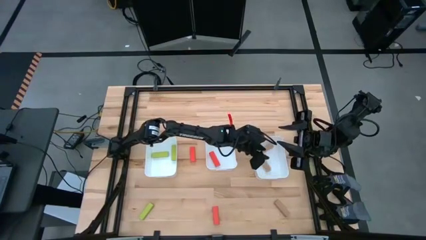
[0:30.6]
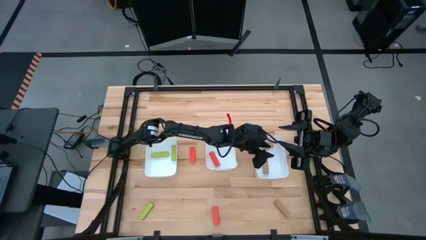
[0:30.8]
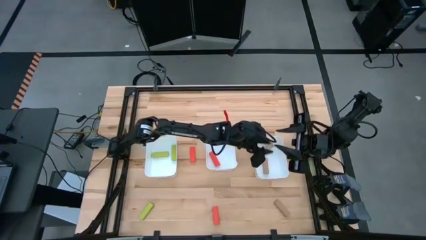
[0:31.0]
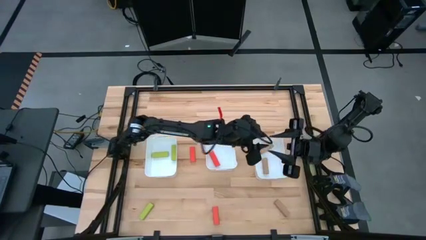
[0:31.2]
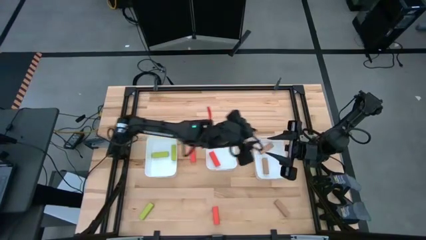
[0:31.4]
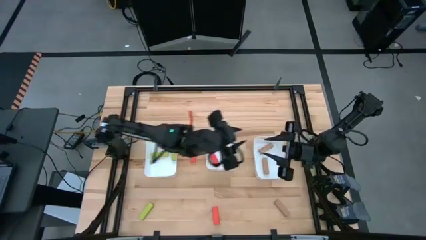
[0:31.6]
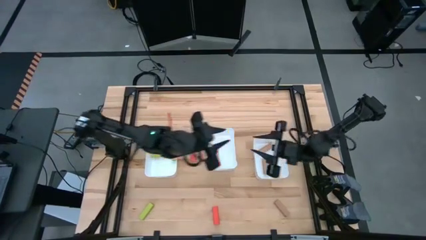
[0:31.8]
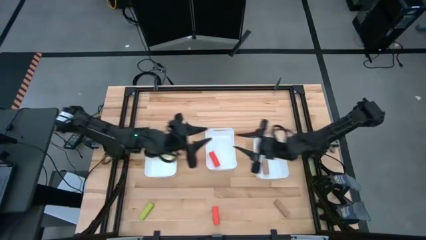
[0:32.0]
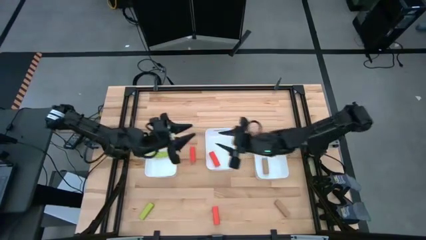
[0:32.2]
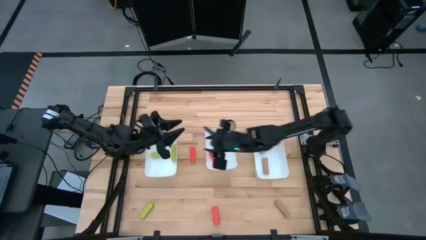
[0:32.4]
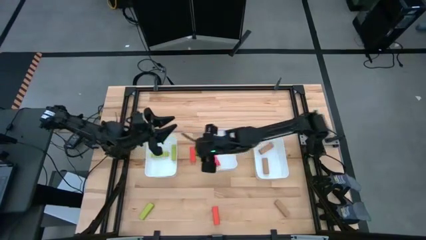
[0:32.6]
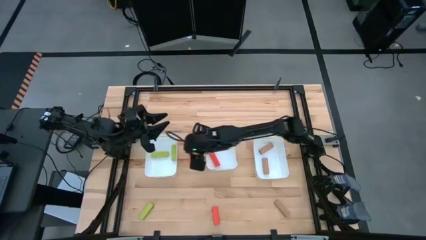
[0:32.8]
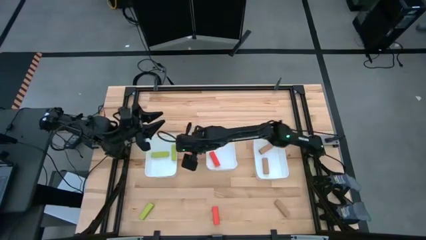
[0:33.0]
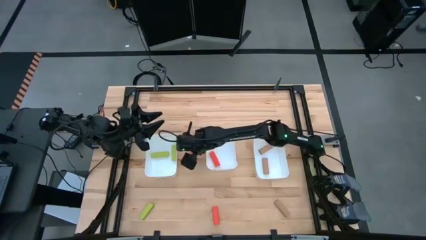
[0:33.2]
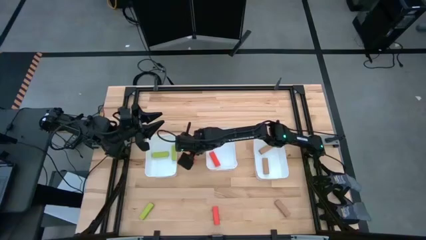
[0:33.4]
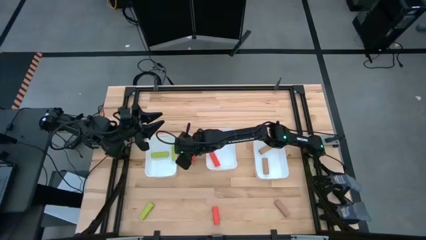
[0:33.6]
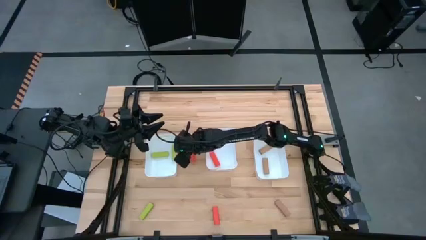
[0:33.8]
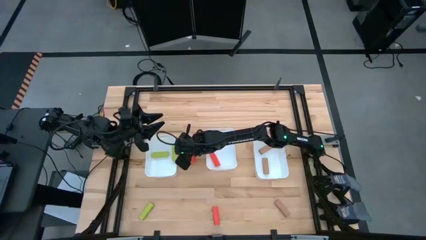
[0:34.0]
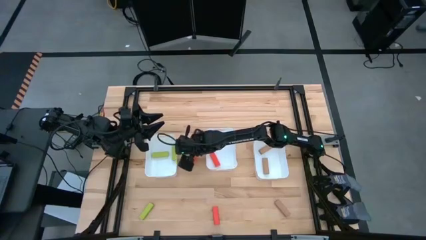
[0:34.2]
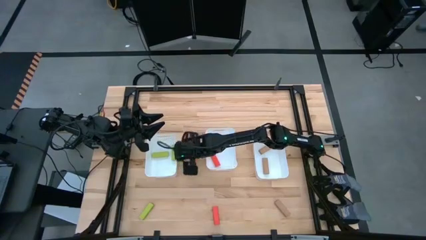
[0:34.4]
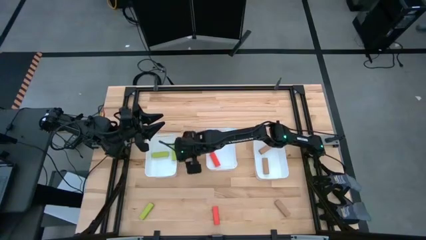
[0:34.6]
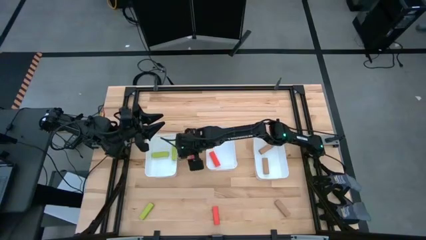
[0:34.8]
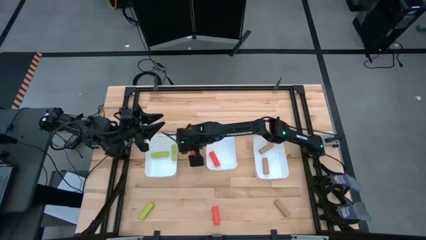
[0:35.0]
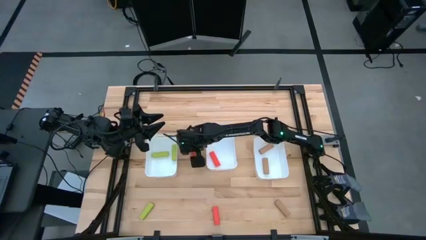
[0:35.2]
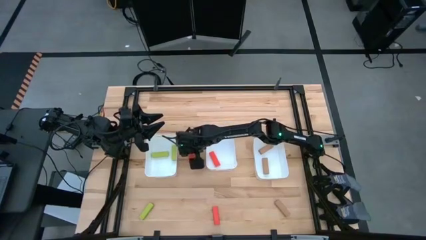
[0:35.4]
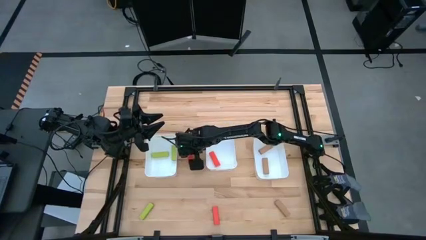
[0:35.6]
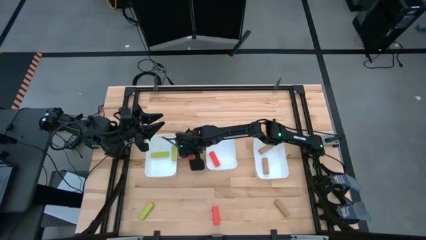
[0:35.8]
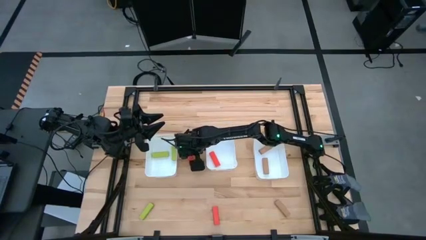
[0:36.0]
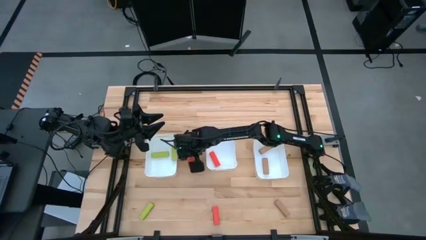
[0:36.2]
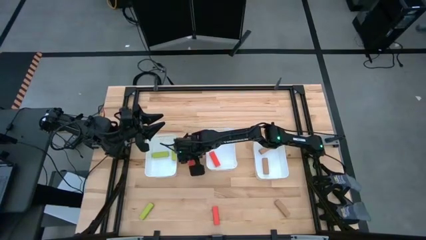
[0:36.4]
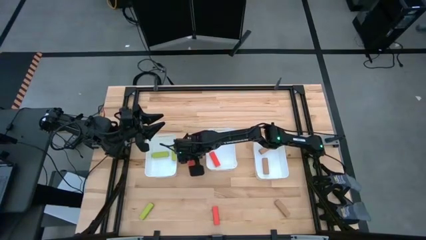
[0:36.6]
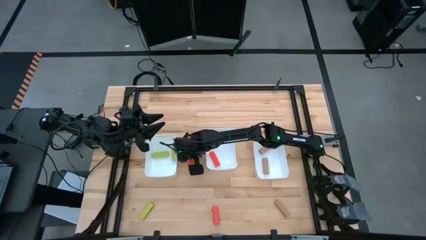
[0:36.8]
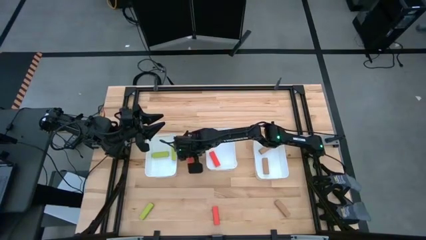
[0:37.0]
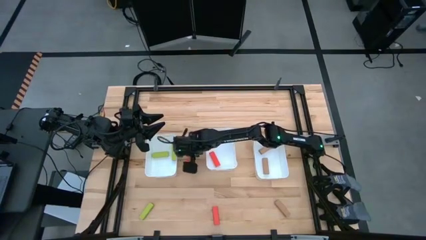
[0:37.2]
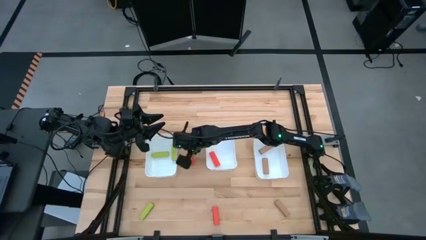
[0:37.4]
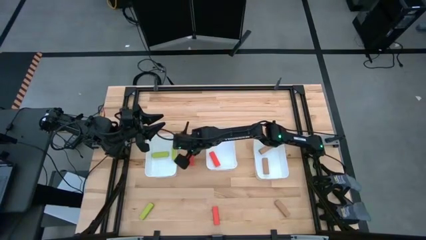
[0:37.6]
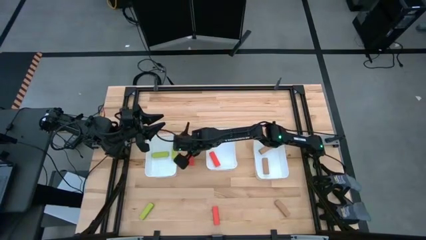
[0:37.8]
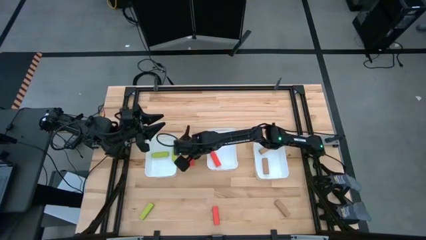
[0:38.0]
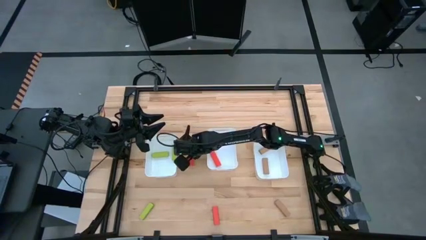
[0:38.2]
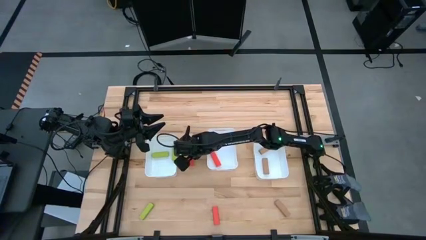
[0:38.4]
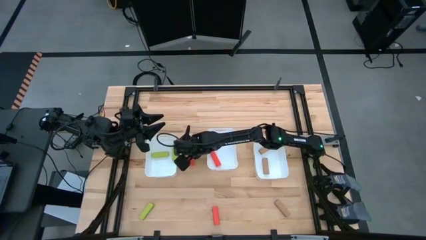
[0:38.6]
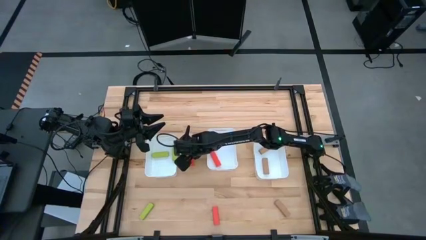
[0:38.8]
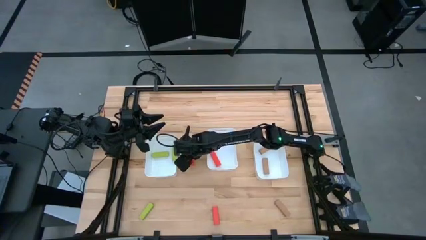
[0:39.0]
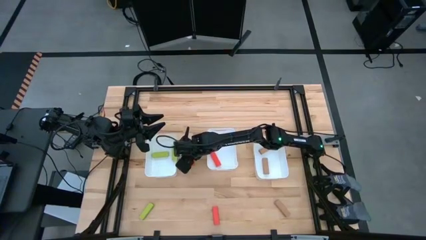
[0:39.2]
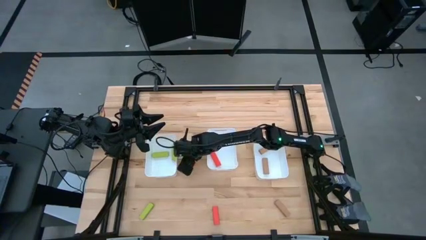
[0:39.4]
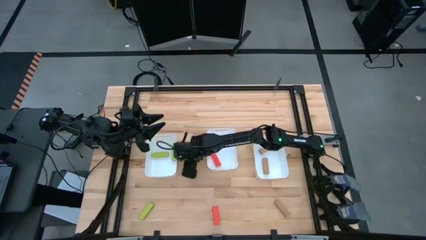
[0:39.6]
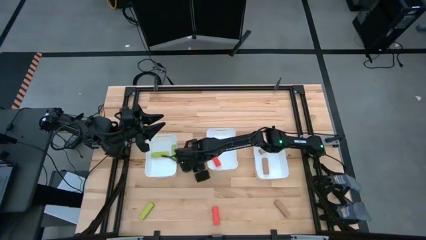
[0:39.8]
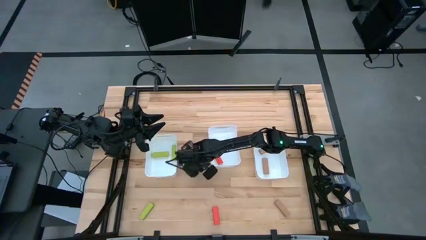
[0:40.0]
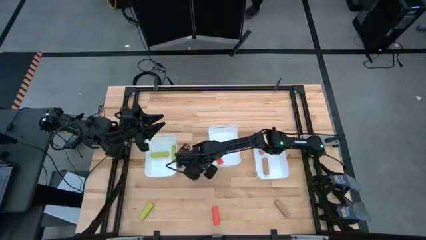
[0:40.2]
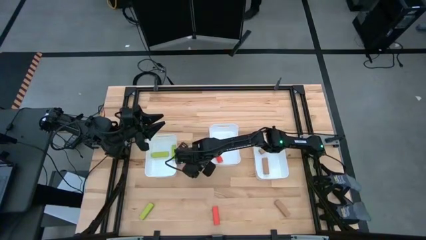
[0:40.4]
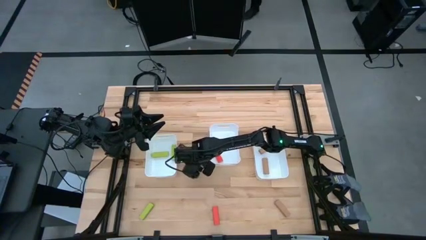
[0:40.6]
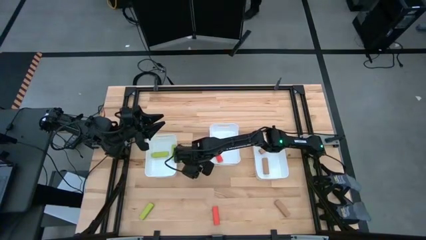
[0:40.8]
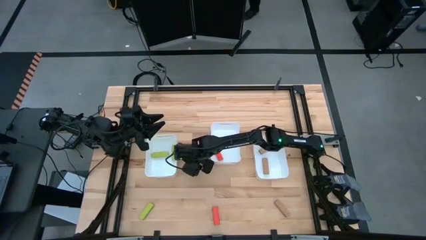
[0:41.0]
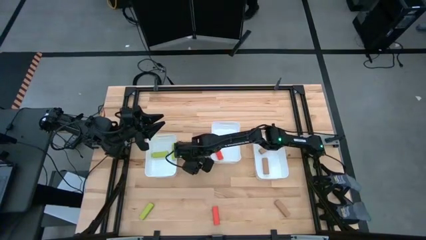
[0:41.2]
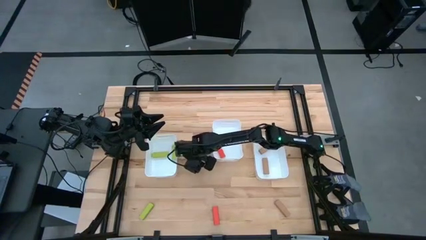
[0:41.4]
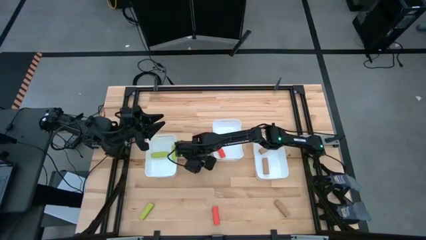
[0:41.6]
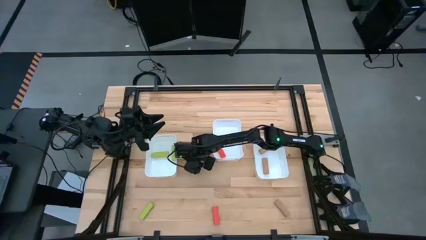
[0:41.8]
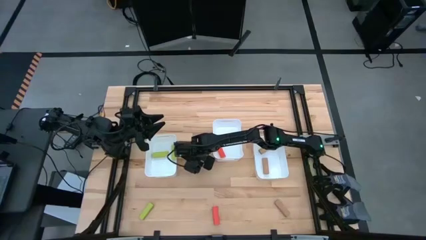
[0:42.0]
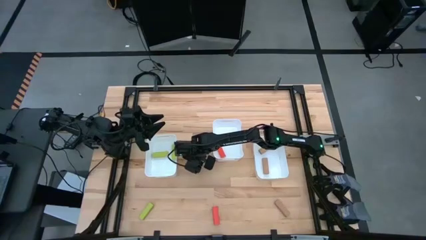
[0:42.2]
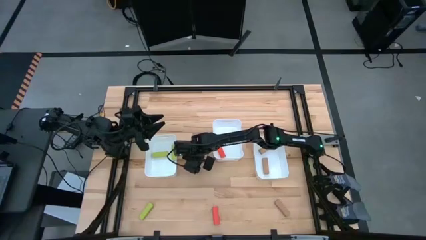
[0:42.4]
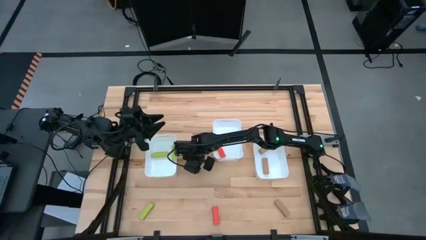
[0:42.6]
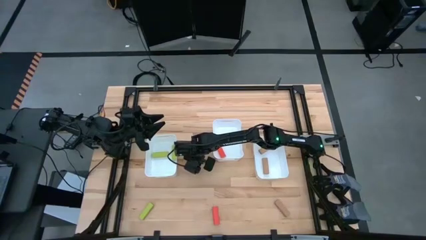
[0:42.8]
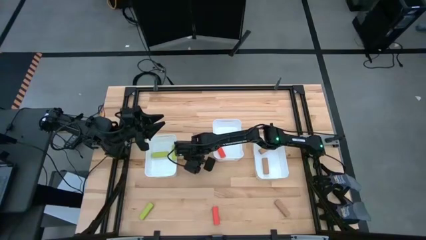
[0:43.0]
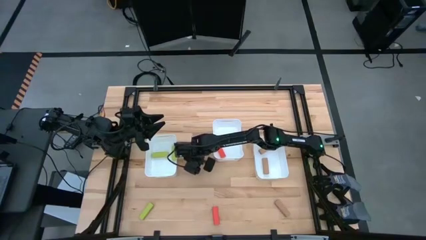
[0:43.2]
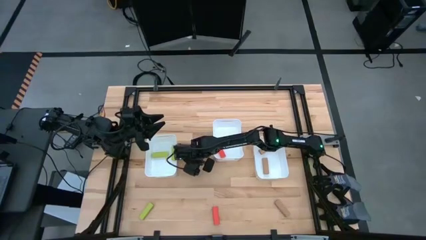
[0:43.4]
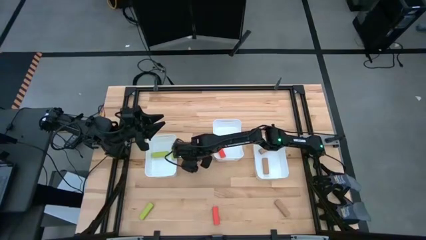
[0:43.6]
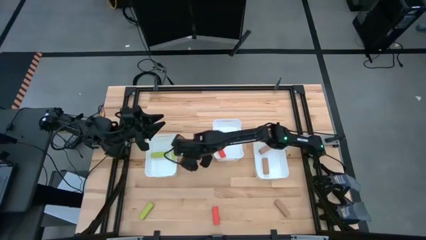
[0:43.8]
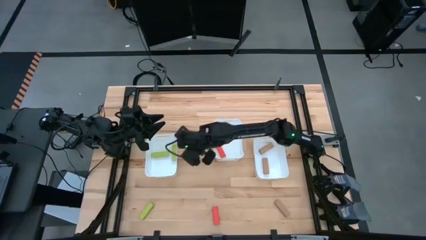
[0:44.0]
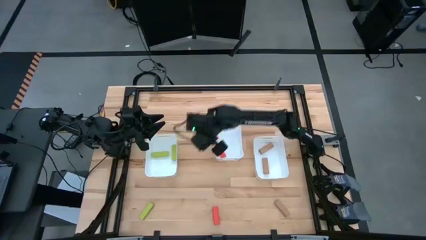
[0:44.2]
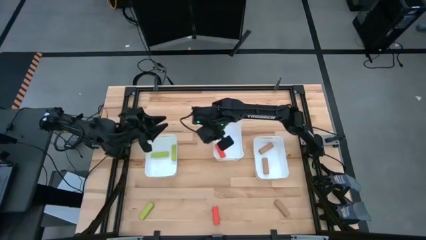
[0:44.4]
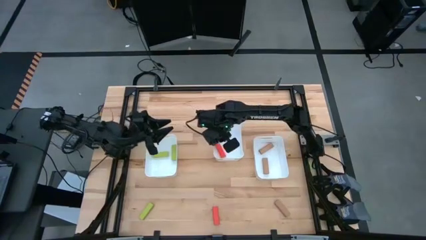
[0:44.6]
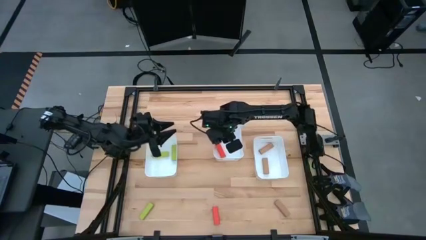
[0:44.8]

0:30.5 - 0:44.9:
Task: Sort blocks
Put the top orange block into the middle white bin

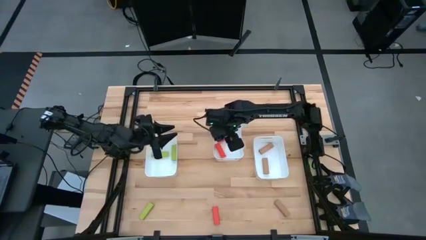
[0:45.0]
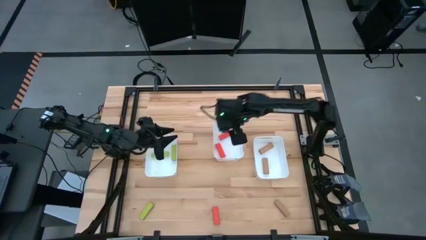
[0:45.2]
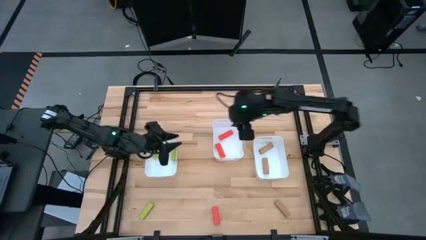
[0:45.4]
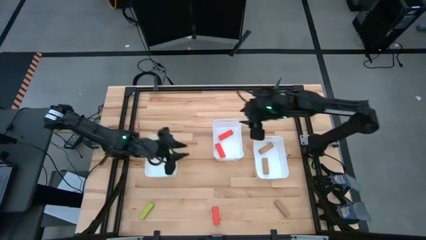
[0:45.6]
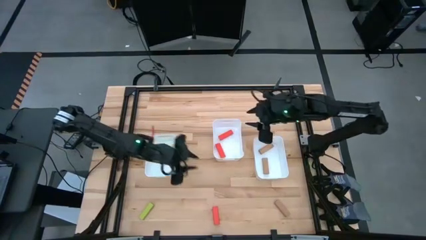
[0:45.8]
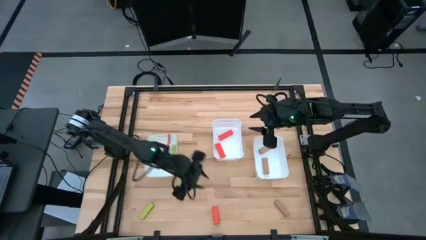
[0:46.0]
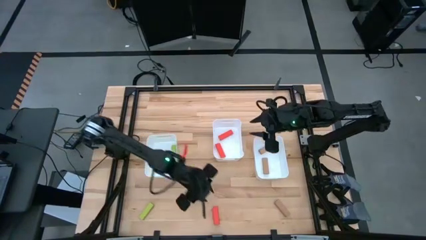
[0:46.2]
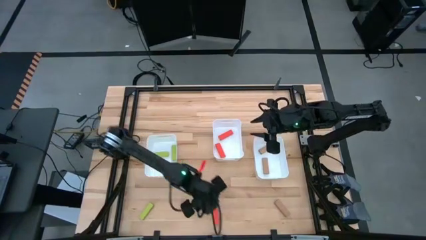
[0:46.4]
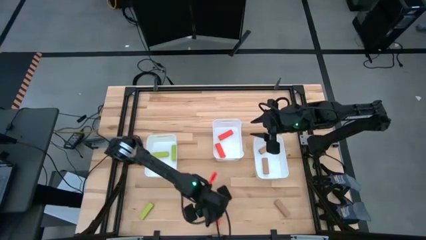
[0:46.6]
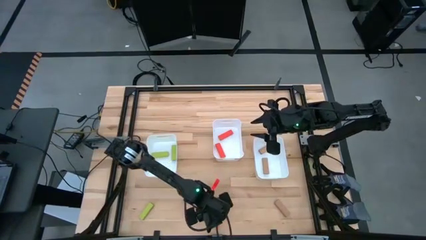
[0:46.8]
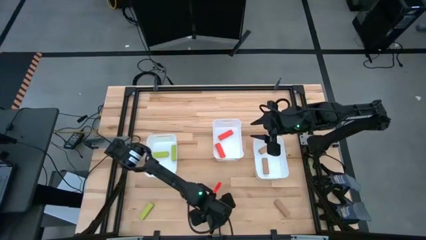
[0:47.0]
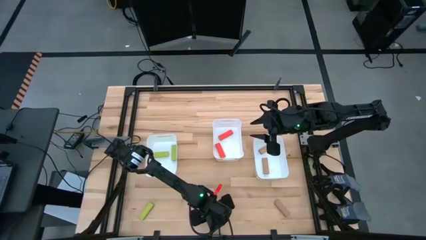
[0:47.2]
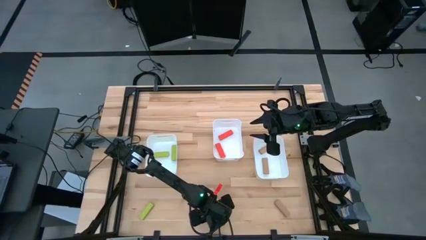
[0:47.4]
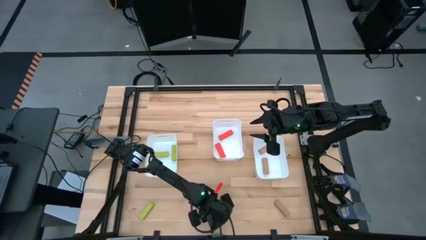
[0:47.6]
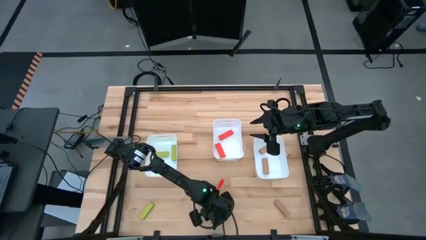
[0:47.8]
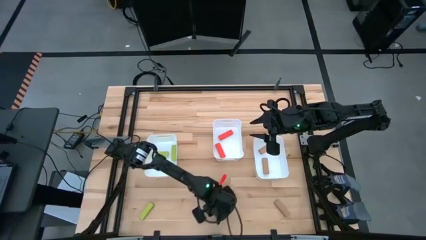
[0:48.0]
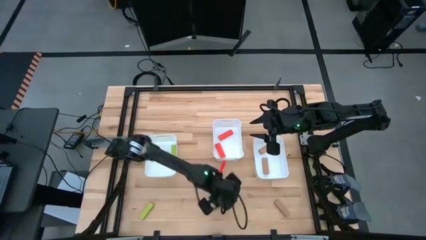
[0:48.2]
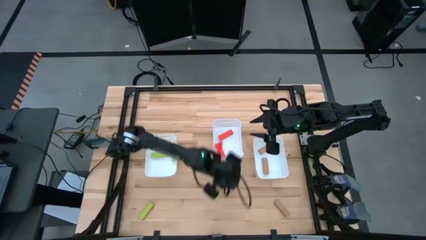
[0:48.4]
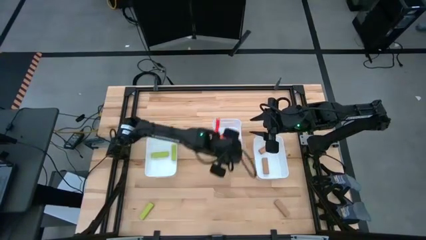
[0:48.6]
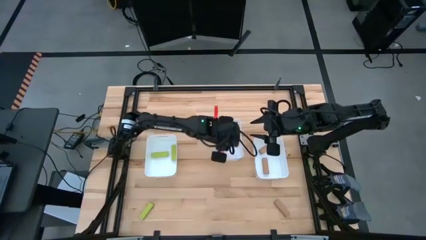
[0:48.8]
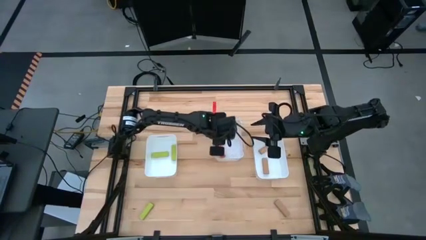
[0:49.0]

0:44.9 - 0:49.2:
Put the orange block into the middle white bin
